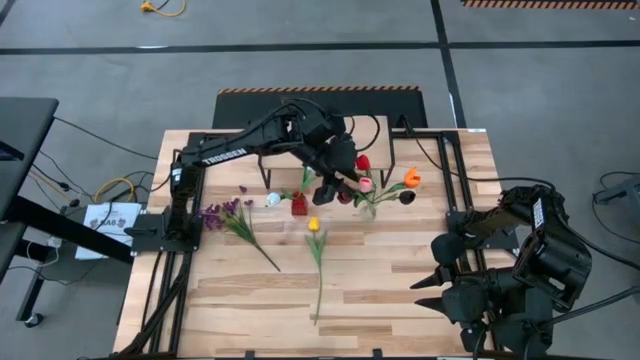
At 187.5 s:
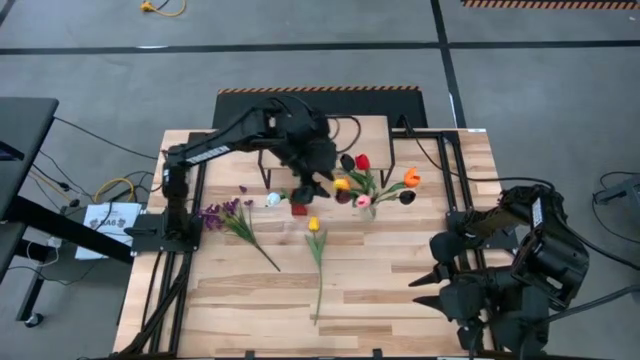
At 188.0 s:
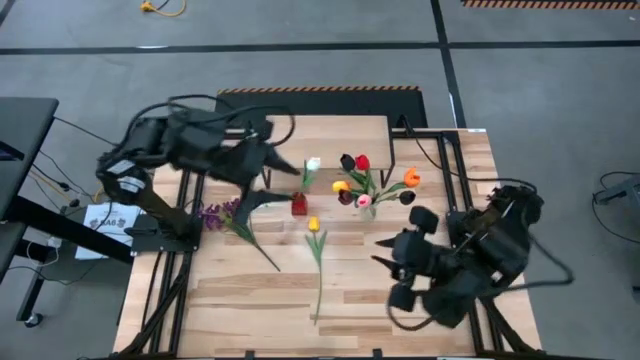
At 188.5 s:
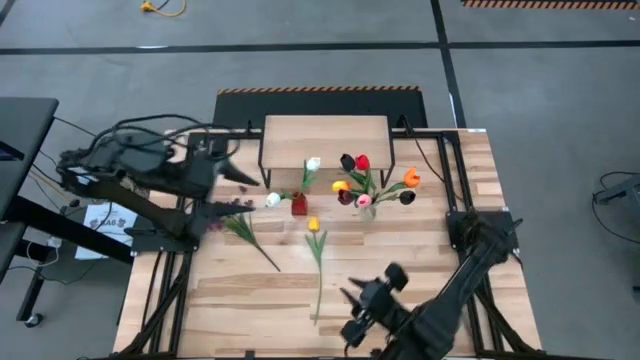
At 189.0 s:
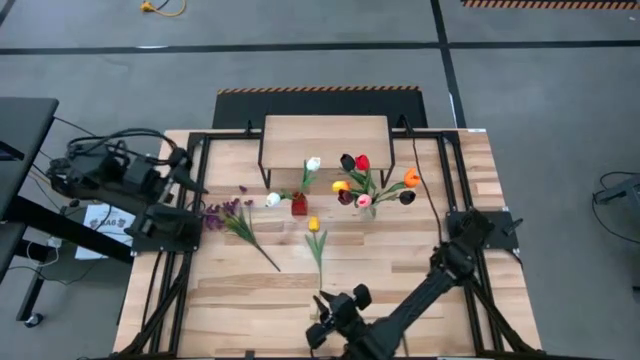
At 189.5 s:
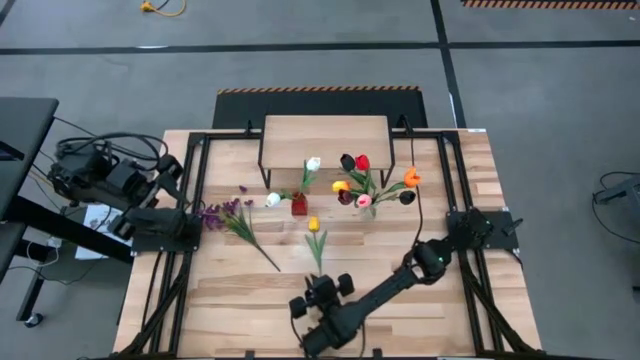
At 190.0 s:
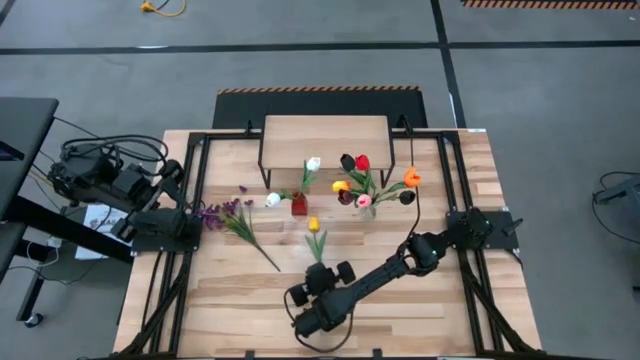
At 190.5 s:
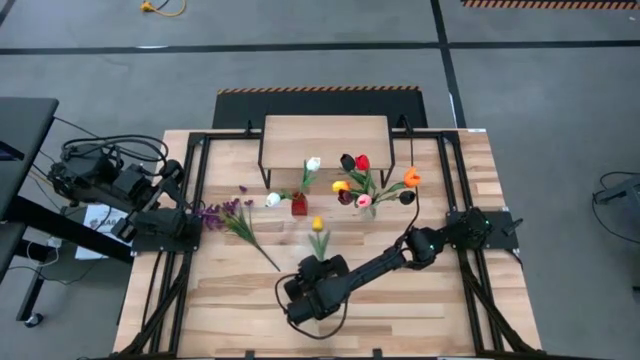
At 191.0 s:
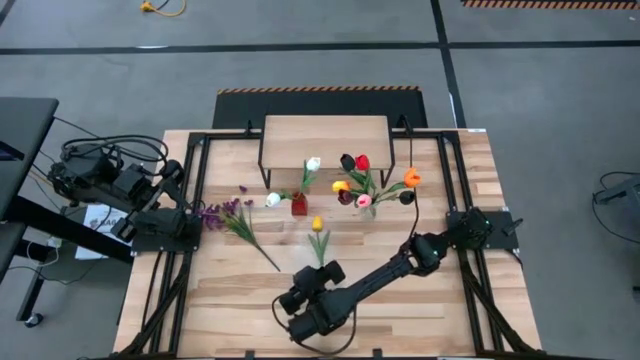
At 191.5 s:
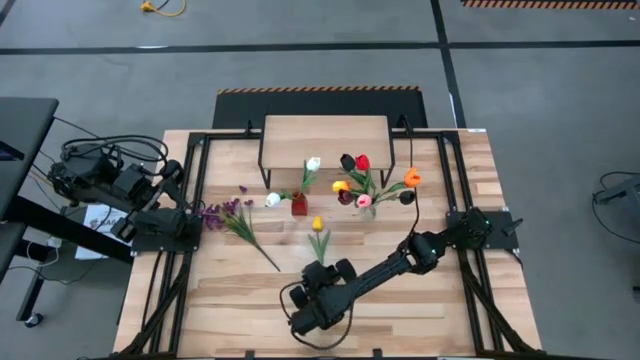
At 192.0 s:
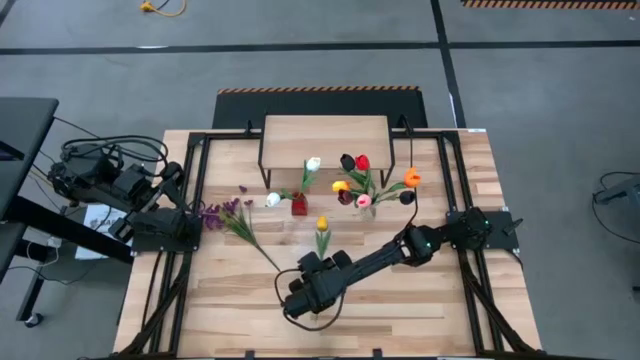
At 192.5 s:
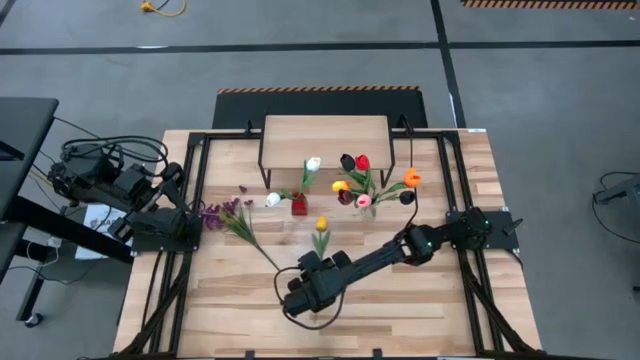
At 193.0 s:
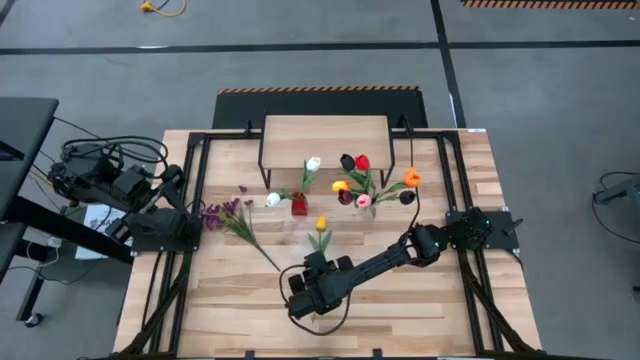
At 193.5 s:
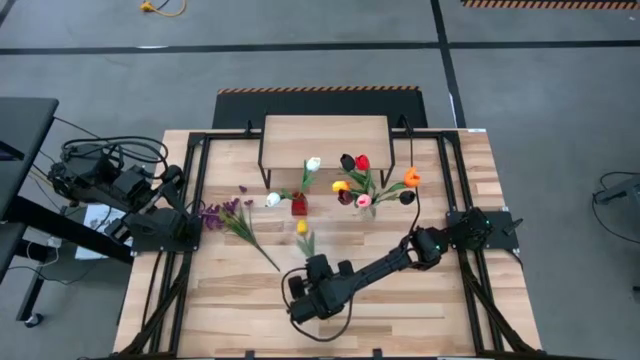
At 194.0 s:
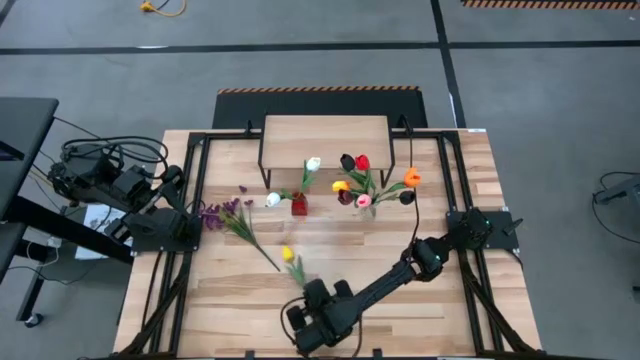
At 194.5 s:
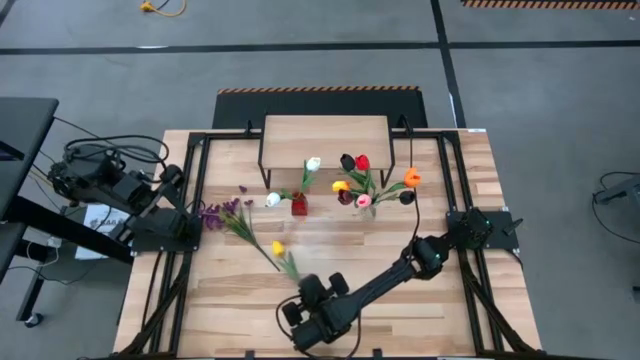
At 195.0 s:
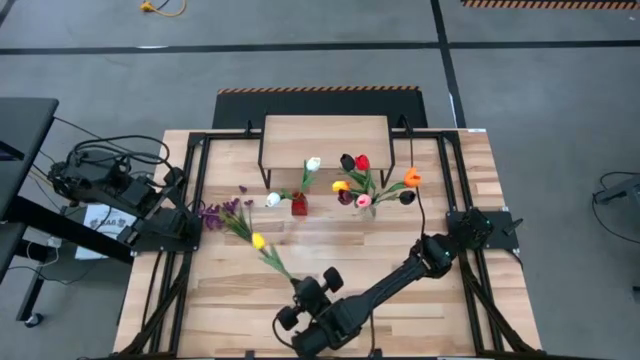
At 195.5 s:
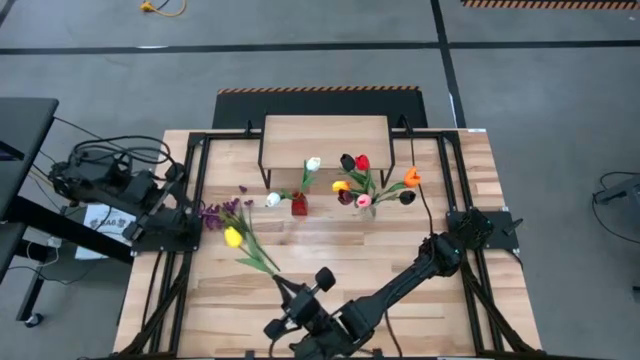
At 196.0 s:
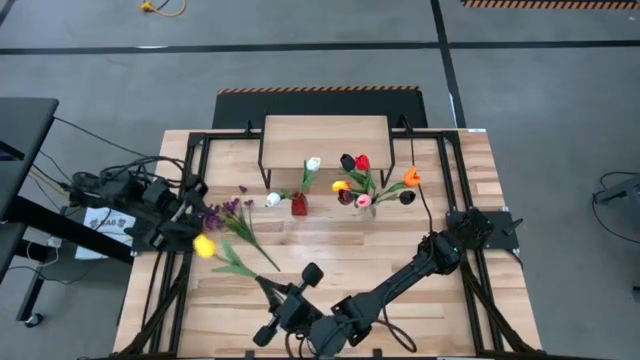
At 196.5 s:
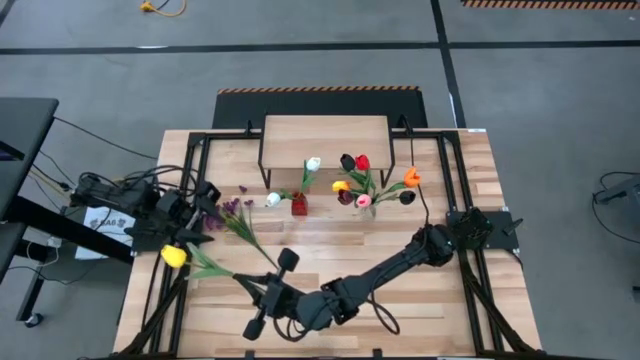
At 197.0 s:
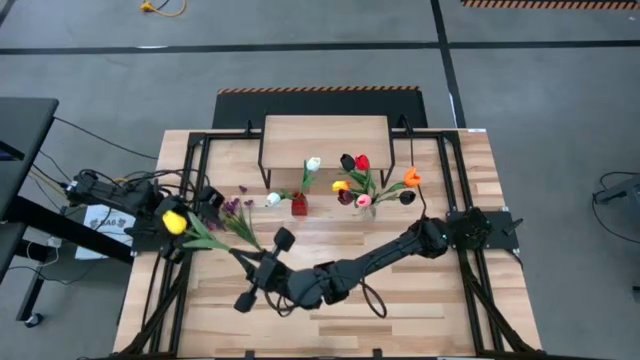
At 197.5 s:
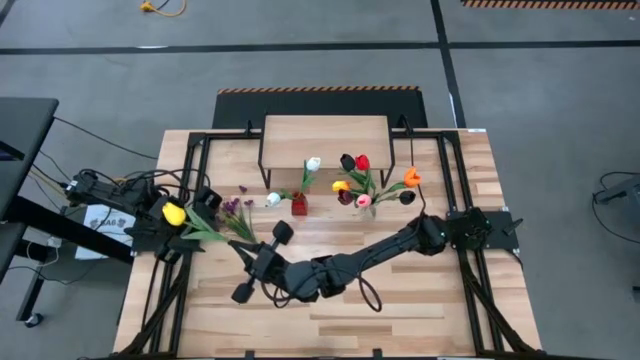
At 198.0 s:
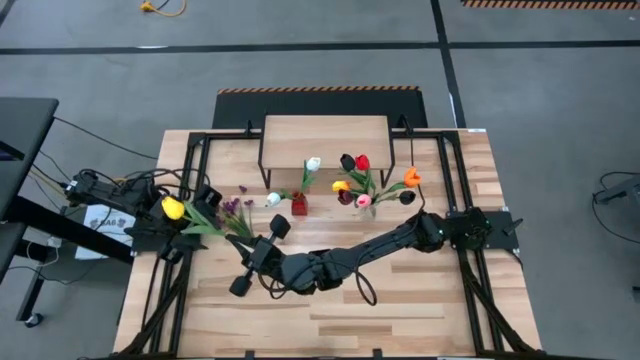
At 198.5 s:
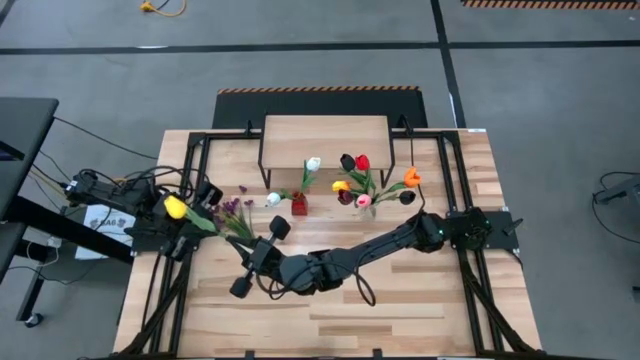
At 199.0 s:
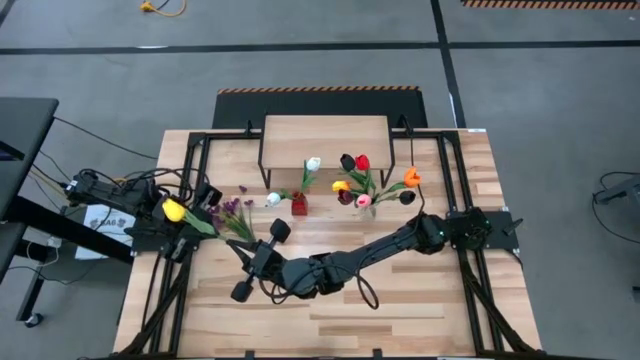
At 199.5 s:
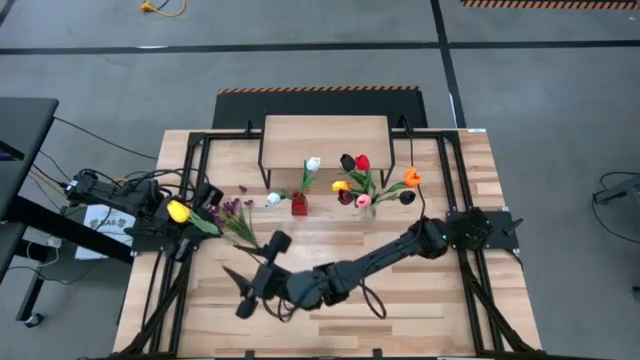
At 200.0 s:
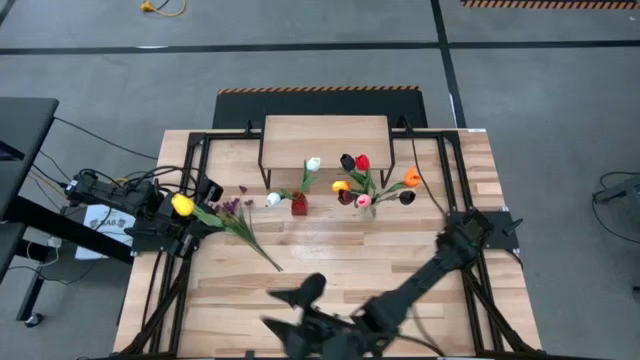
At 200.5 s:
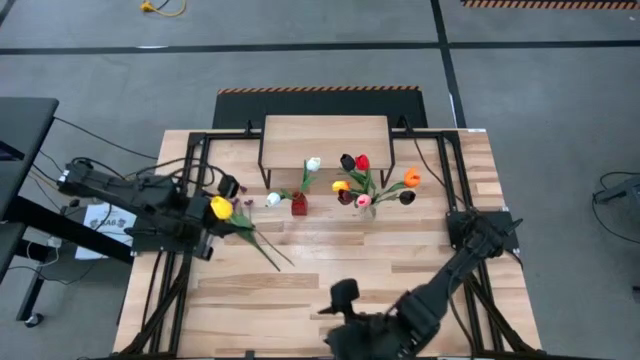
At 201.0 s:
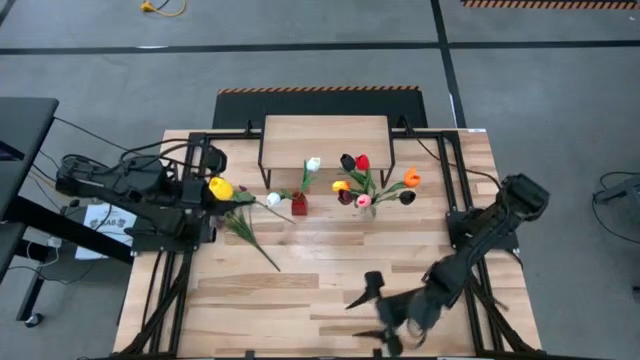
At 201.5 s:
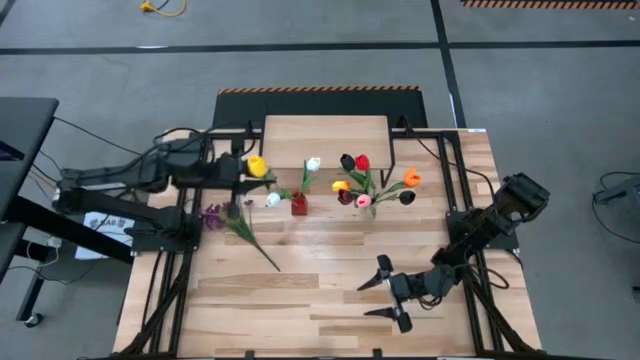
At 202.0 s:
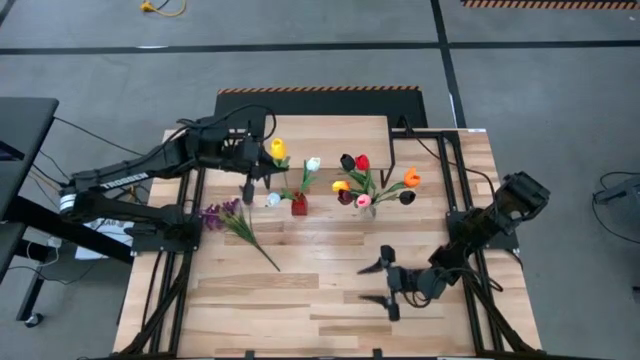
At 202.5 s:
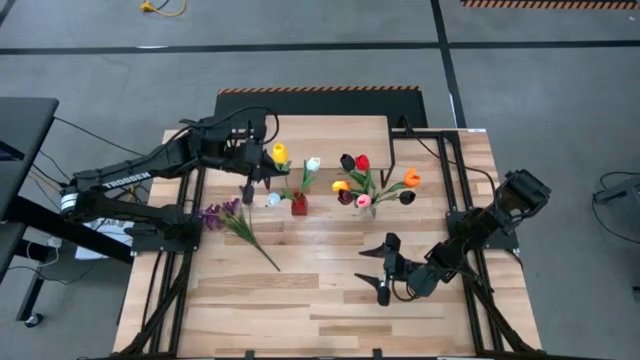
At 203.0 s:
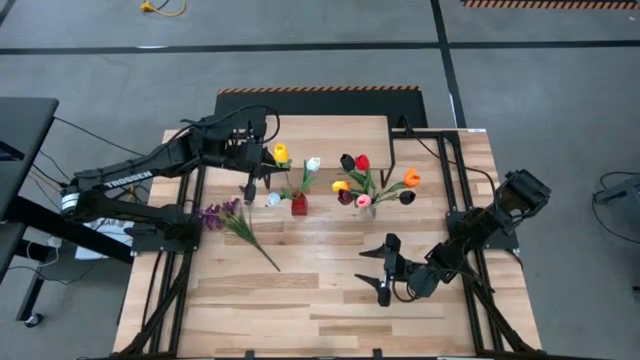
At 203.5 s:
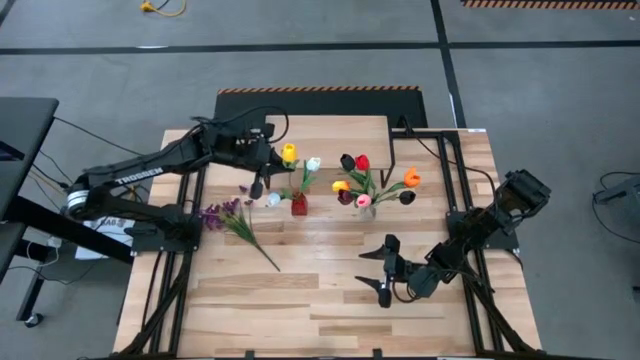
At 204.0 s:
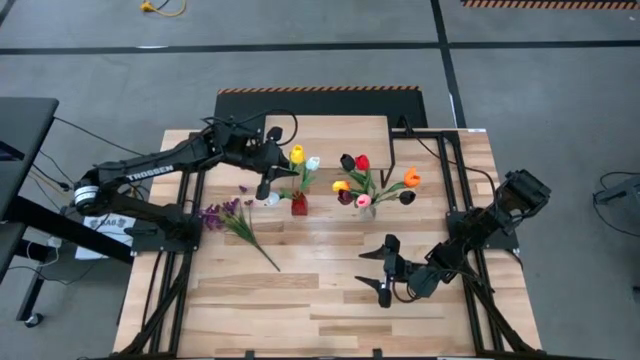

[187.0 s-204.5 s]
Task: Pick and place flowers into a vace then onto a shelf
Put the yellow flower into the red vase

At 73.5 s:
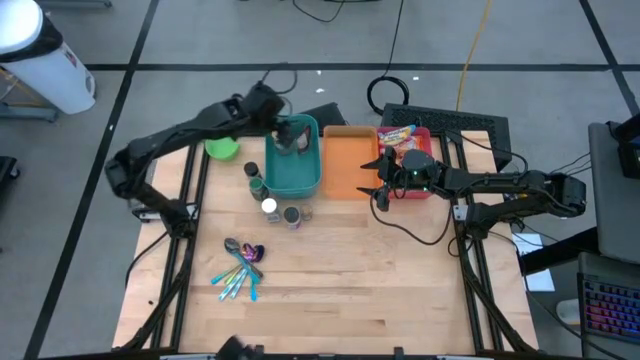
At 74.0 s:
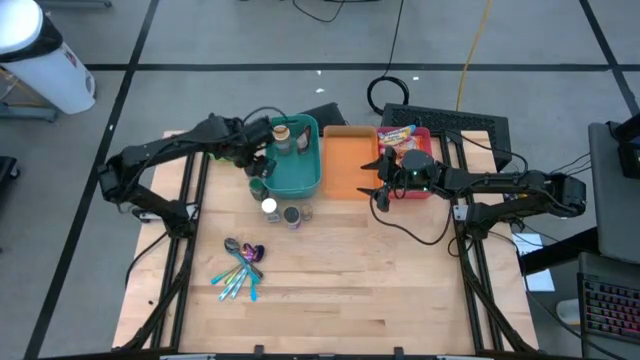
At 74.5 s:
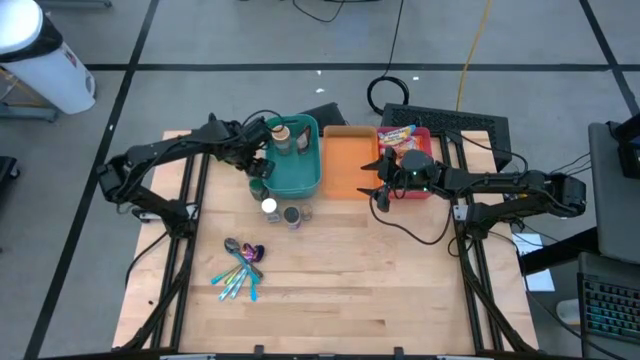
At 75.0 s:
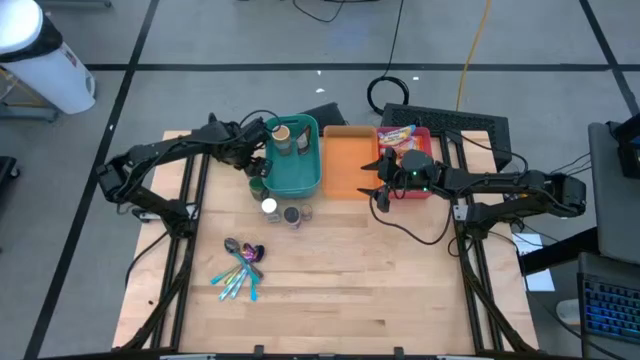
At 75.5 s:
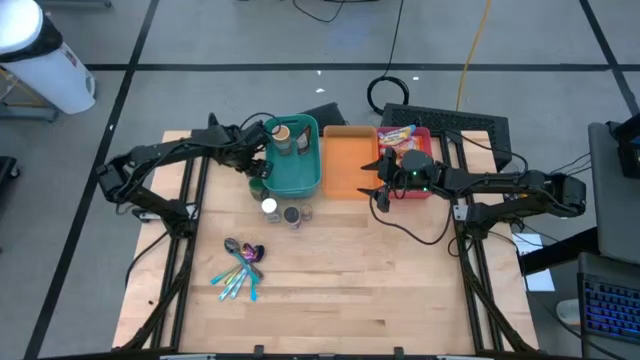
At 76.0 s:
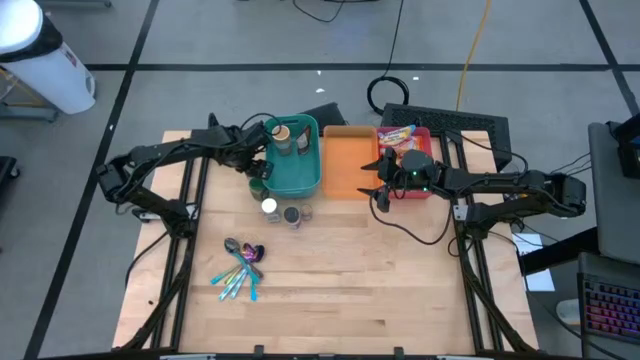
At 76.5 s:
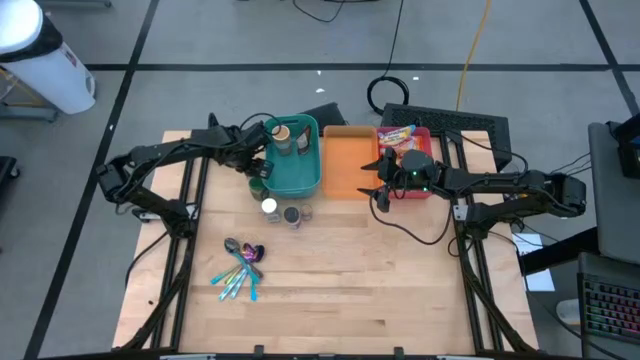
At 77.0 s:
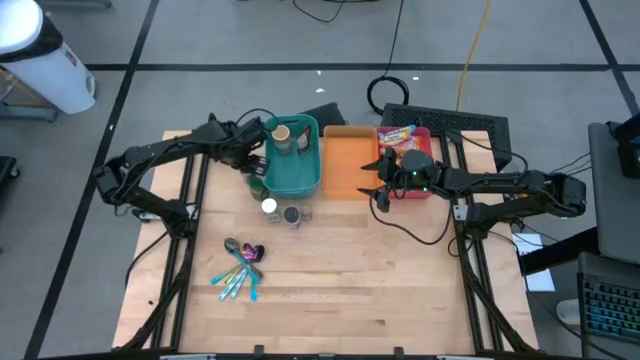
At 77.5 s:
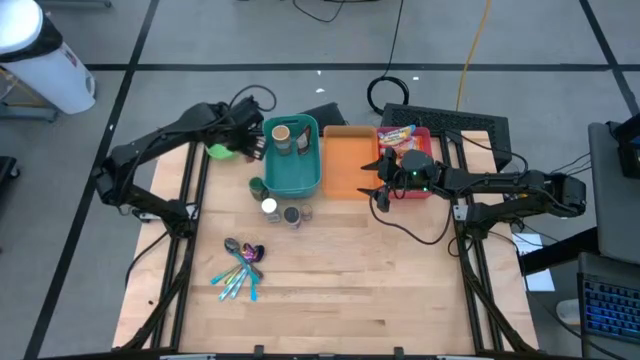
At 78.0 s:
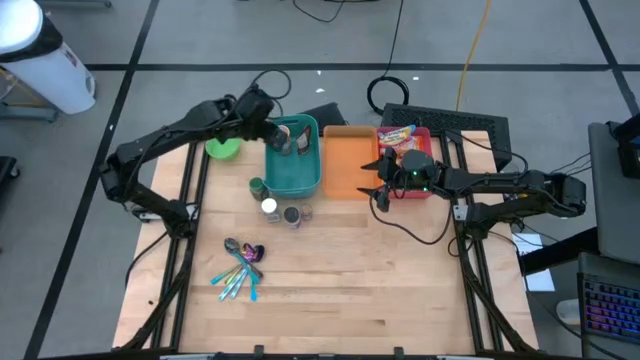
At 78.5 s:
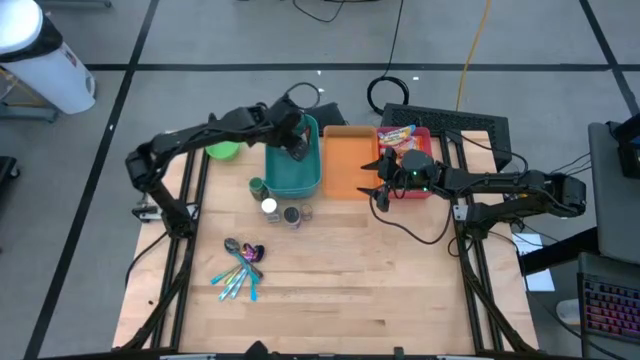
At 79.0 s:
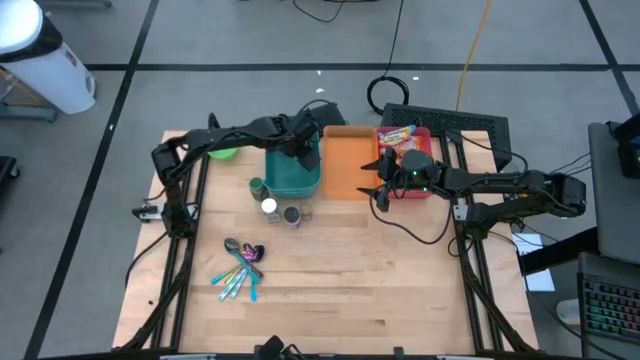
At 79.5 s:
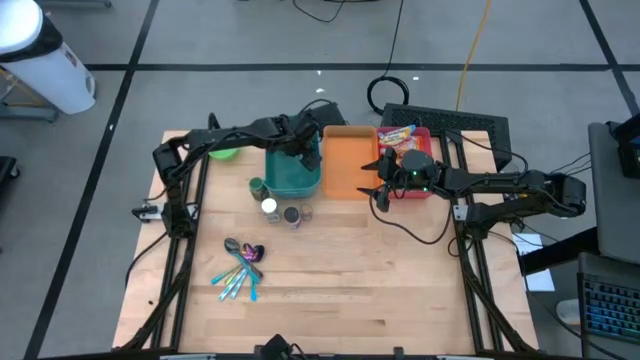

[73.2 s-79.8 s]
Task: Pick & Place Food Item
Put the black and orange seasoning bottle into the green bin
